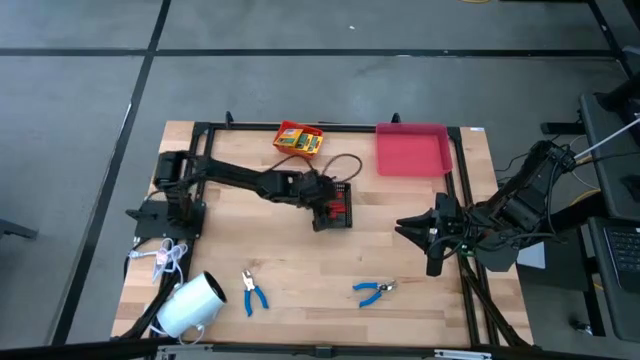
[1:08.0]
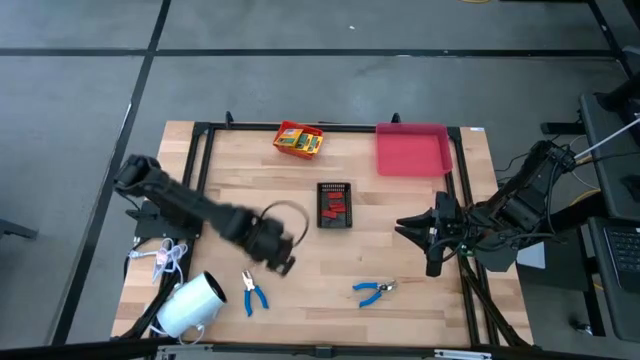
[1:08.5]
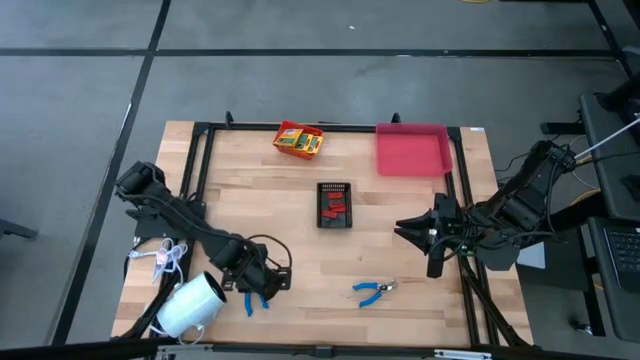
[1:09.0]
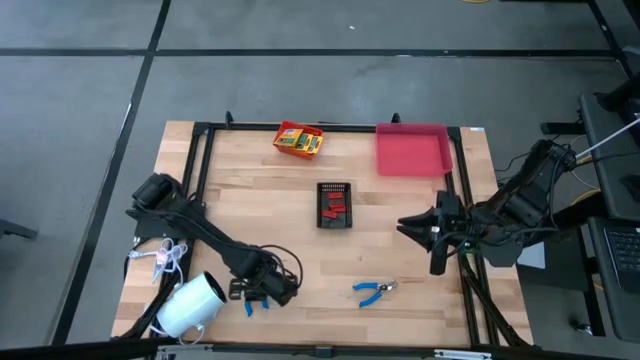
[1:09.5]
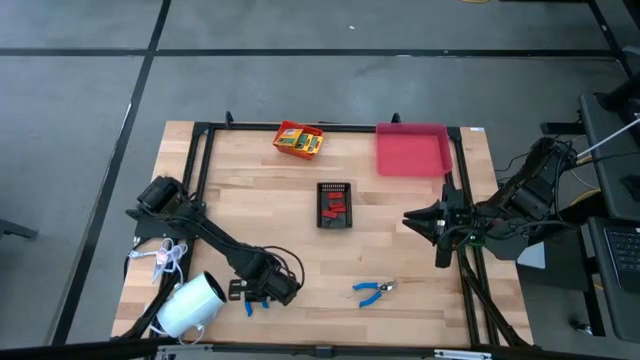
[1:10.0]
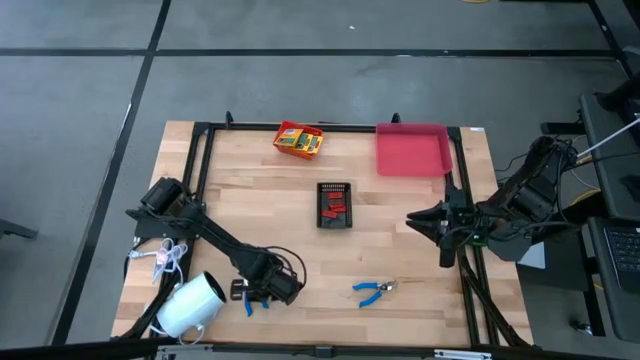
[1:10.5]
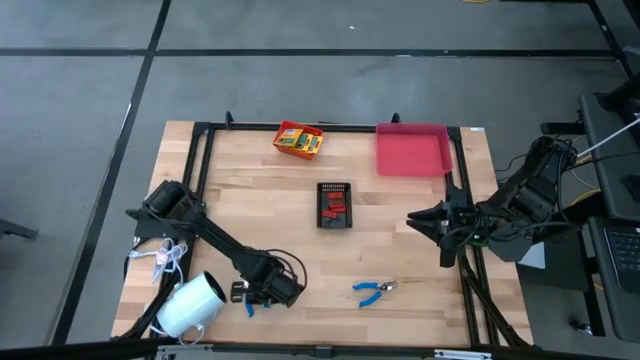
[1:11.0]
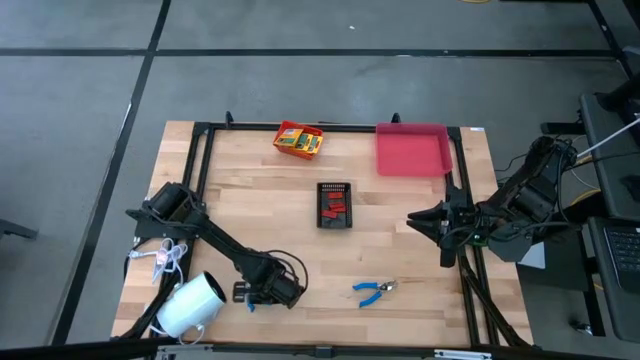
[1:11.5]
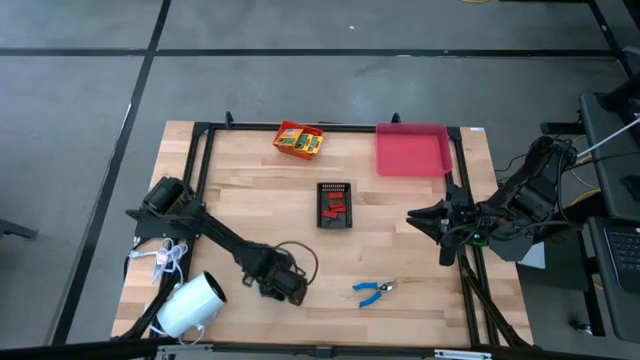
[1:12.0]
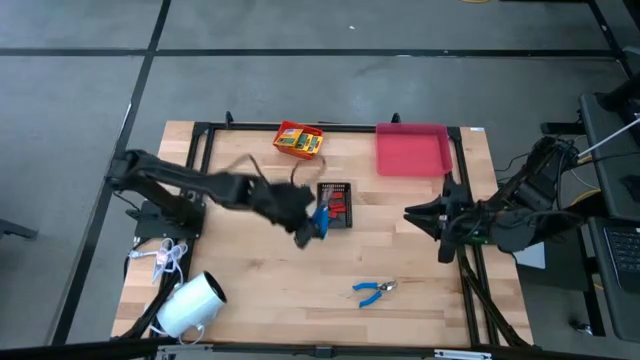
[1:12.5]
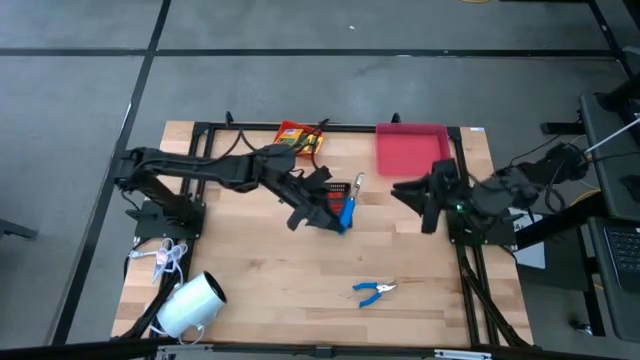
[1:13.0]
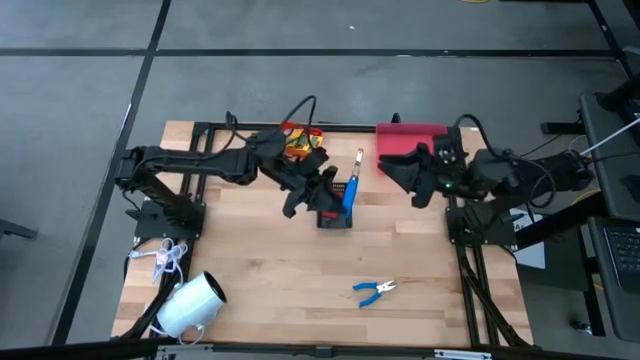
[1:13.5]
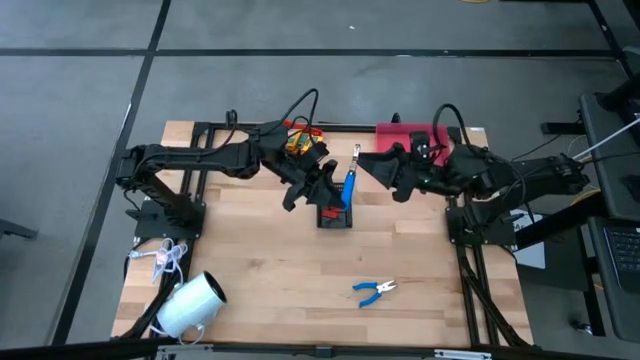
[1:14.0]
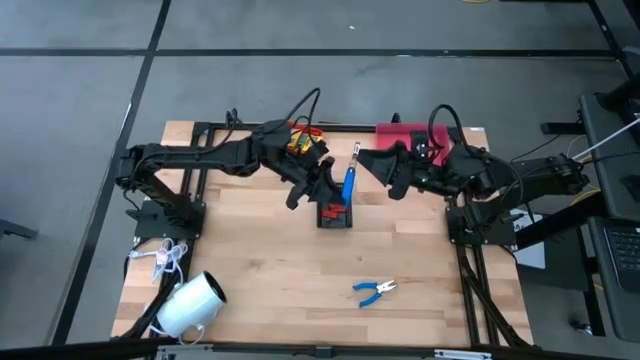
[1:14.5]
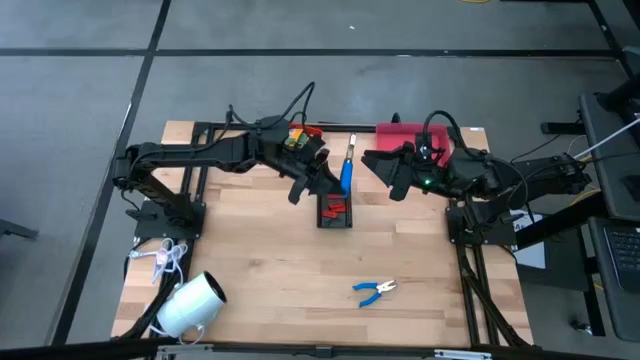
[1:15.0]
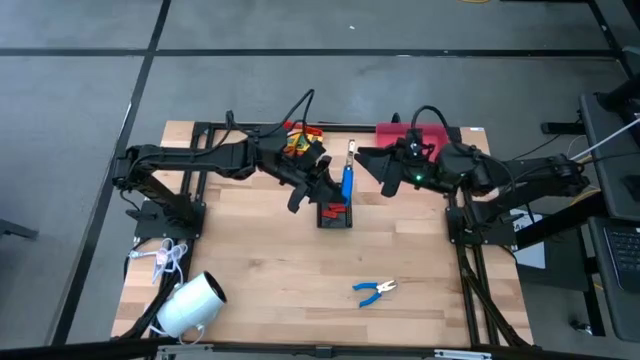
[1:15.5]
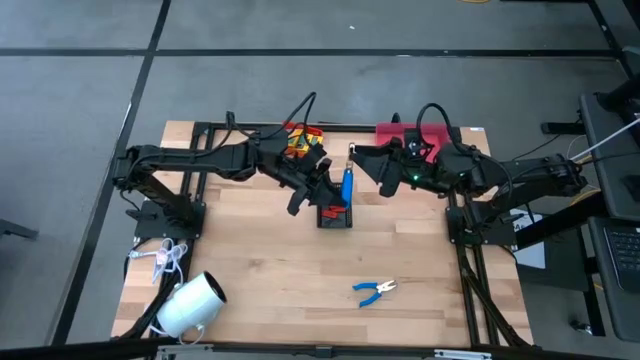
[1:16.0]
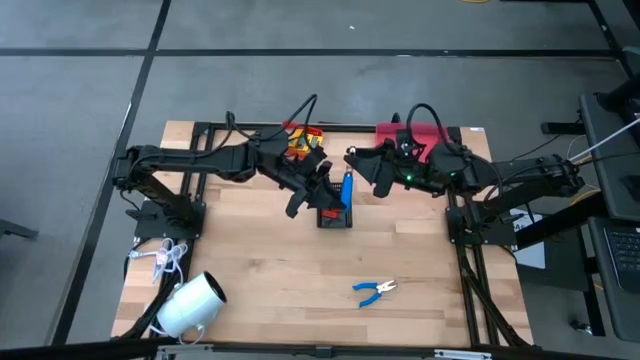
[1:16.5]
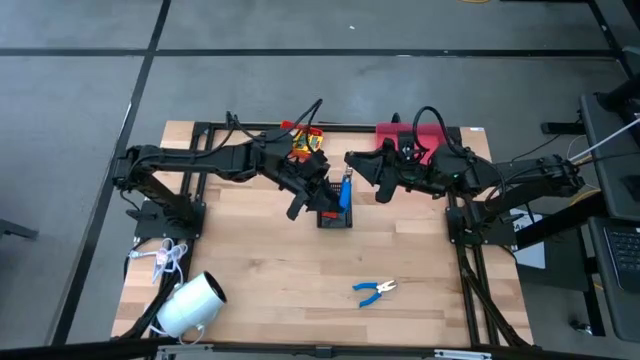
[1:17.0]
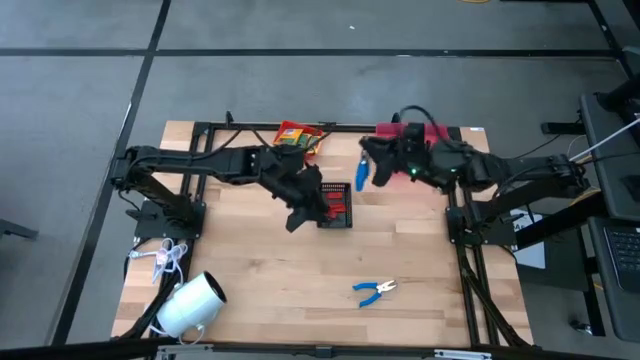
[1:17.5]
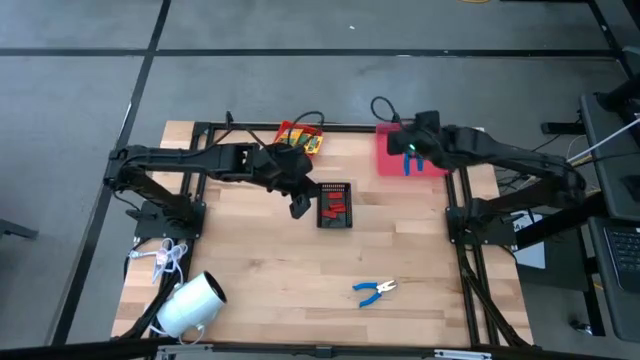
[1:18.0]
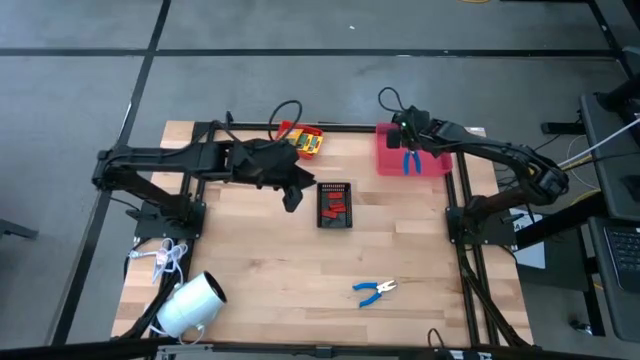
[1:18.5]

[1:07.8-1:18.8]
Task: Pick & Place School Supplies
Put the blue hole puncher into the red transparent bin

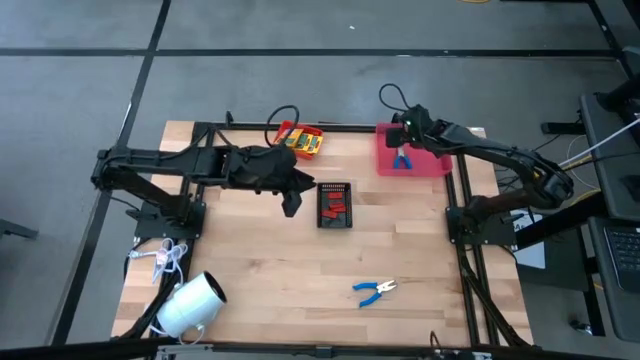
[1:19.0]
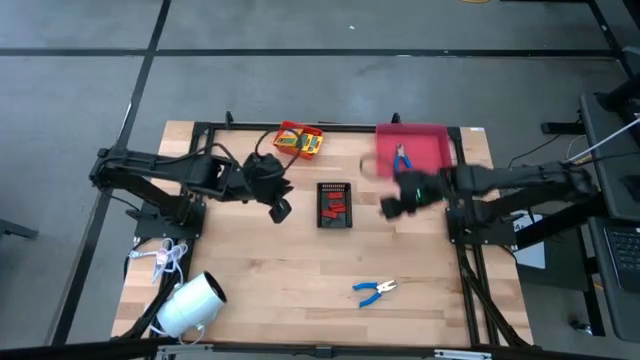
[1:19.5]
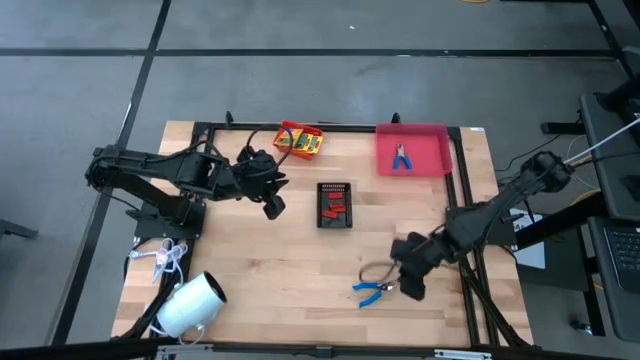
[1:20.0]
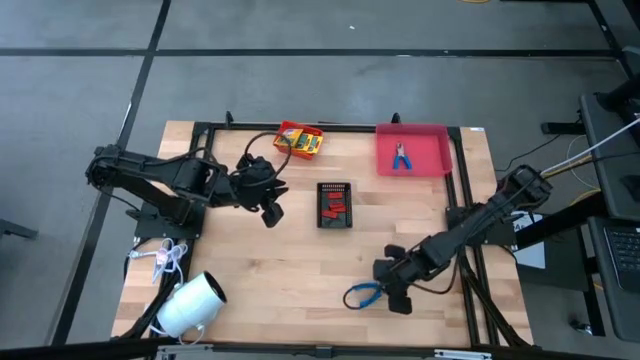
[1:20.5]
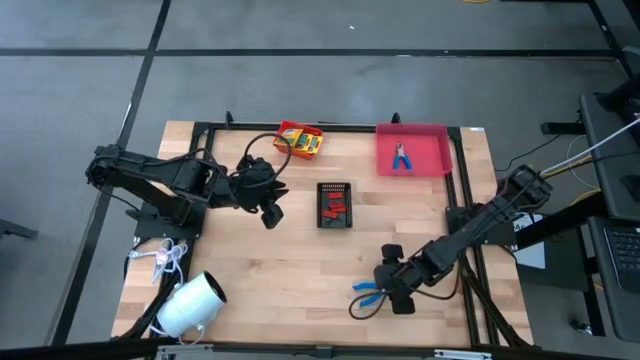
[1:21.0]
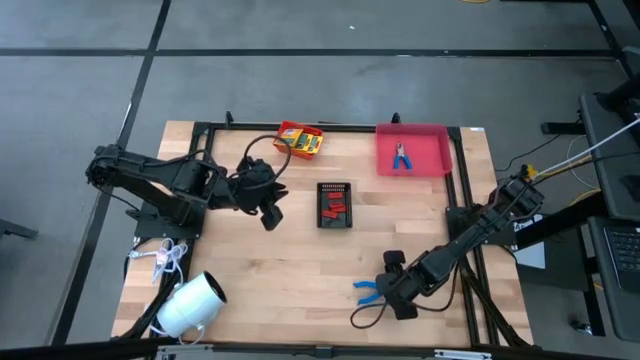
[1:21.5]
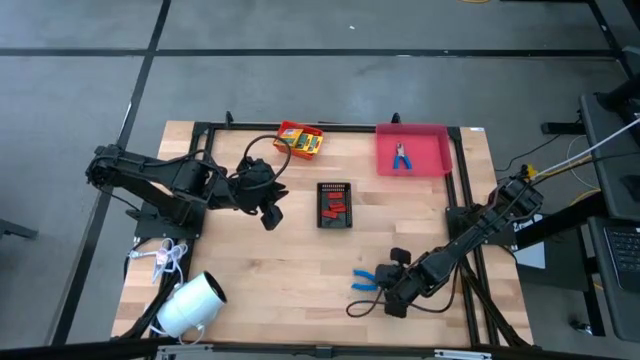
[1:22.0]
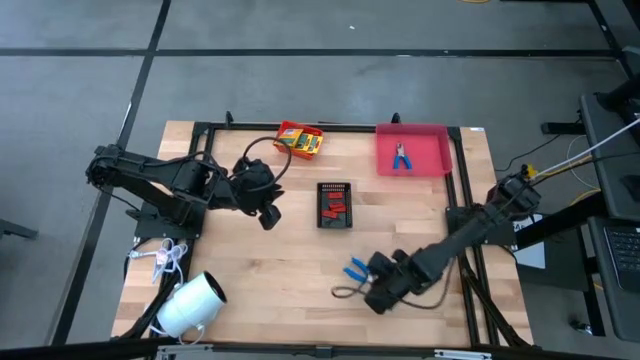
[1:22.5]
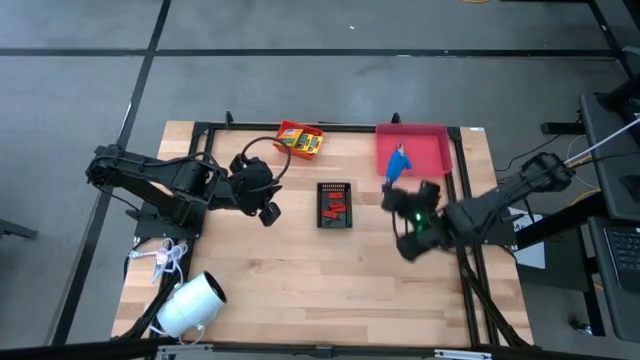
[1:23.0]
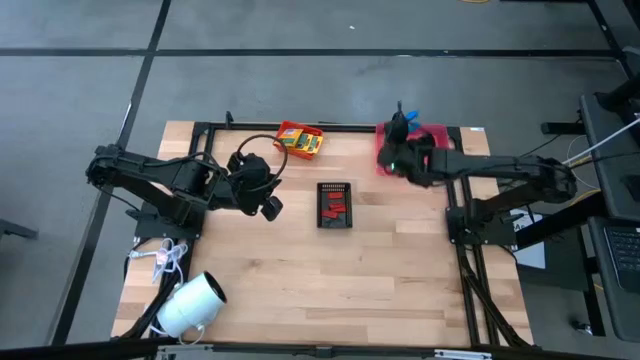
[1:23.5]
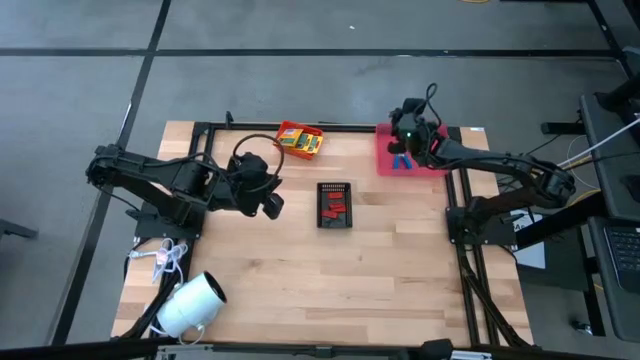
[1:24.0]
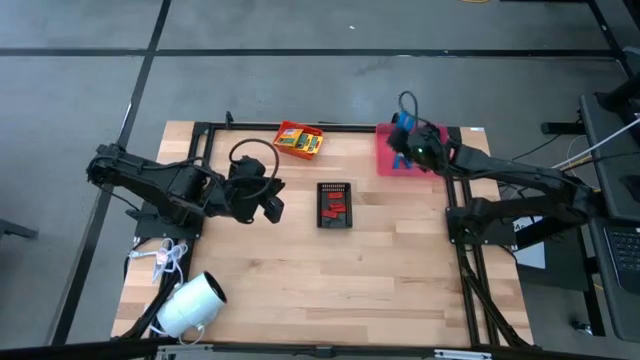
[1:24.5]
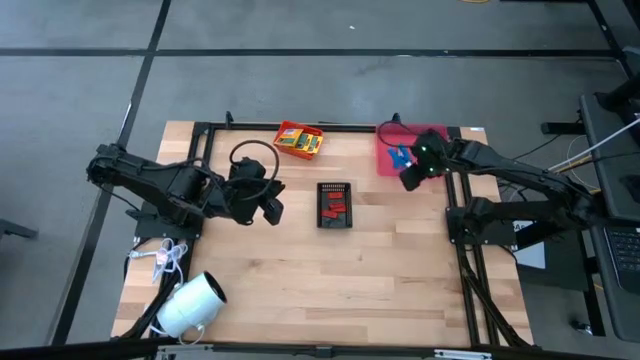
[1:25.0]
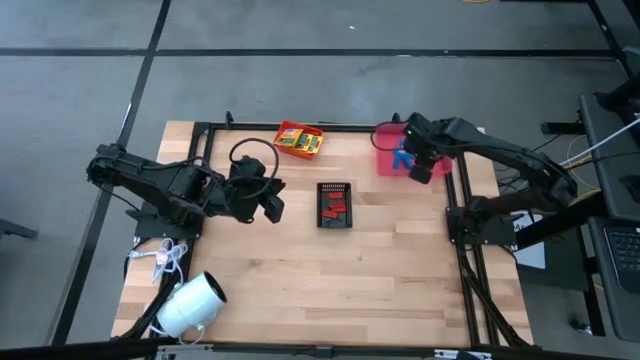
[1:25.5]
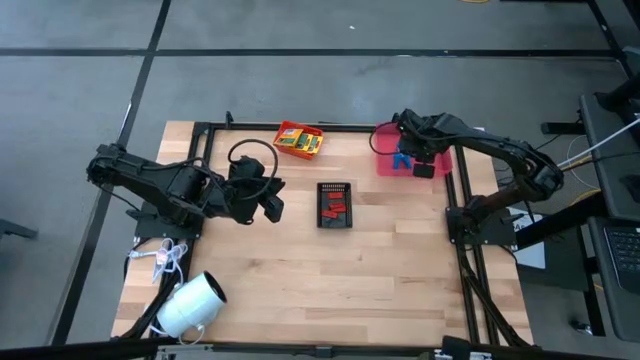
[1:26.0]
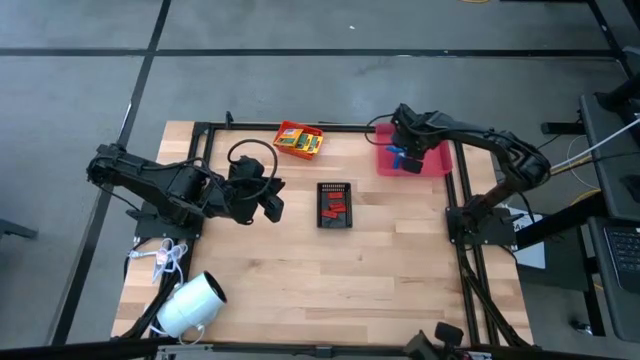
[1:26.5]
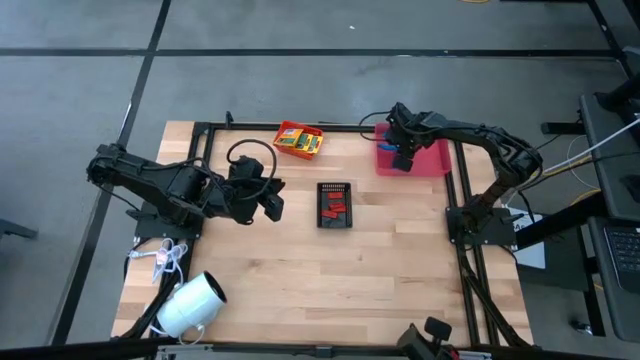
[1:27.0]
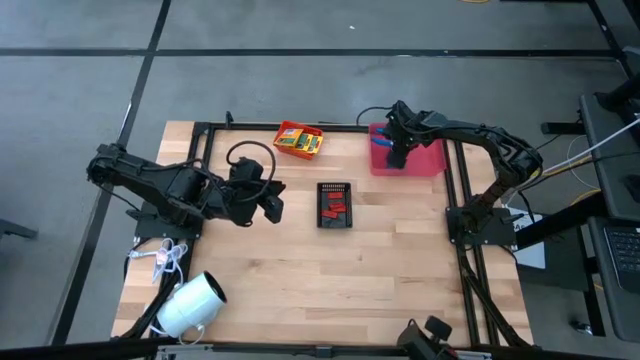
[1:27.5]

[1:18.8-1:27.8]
Put the blue hole puncher into the red transparent bin

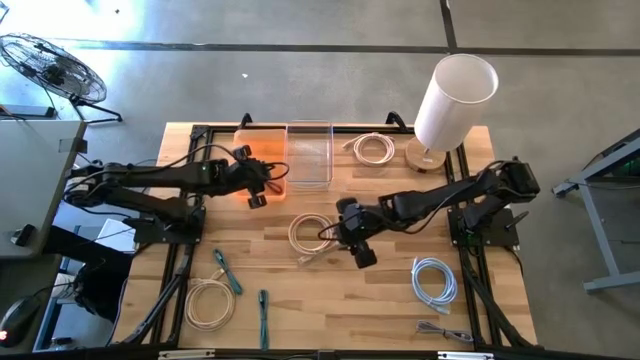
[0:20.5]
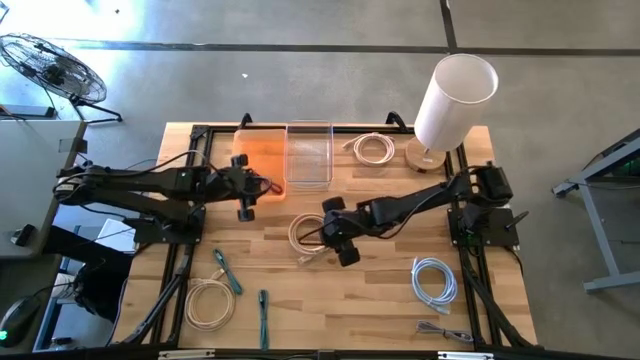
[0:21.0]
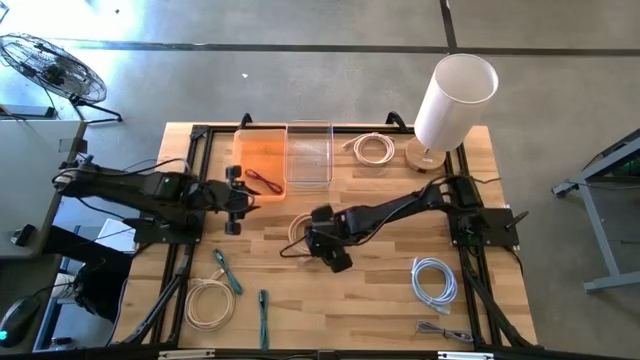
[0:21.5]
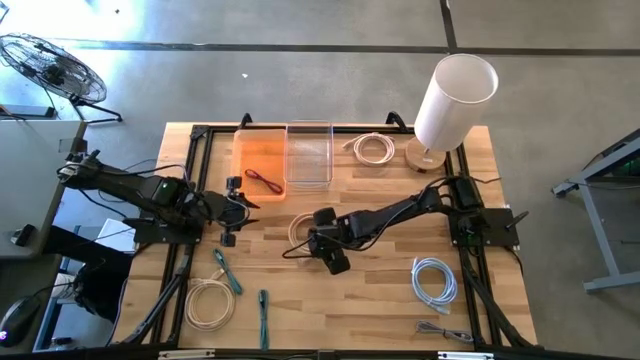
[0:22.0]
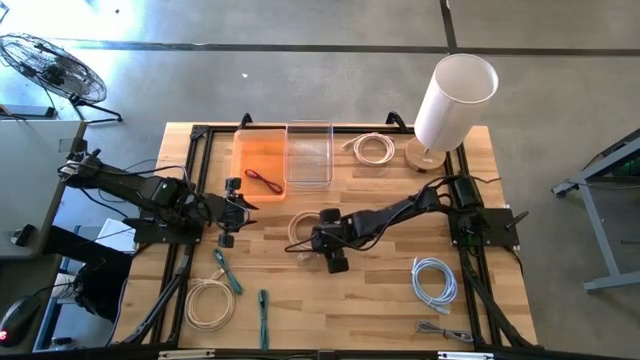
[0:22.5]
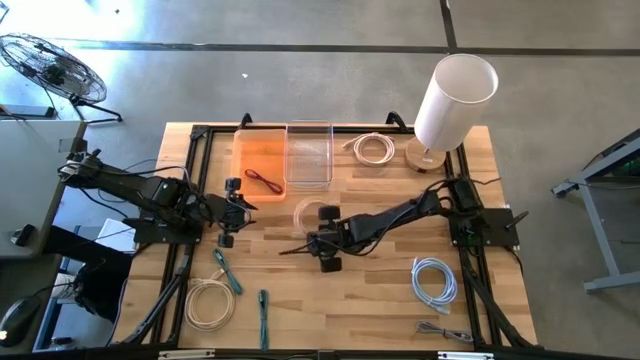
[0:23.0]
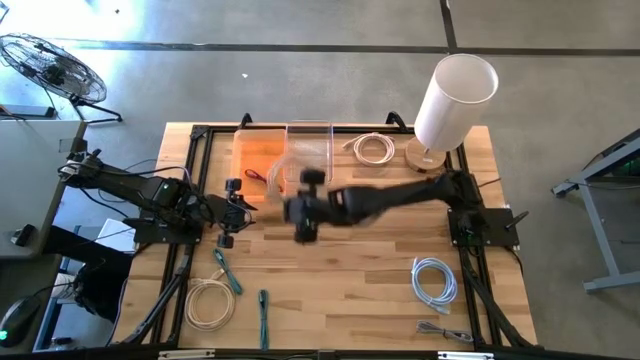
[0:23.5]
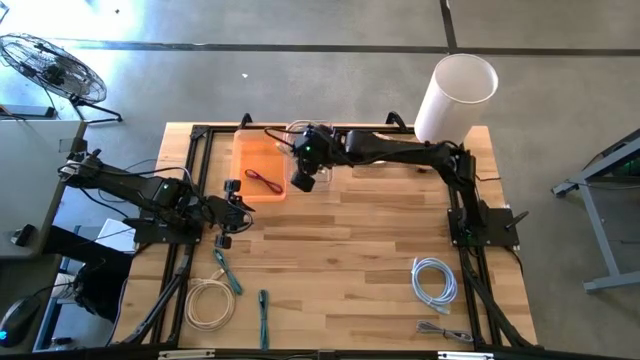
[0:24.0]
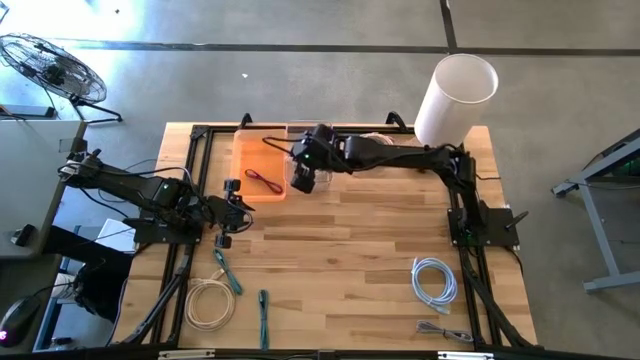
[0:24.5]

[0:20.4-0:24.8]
Task: Pick & Place USB Port
Put the middle brown HDMI cable into the transparent bin
